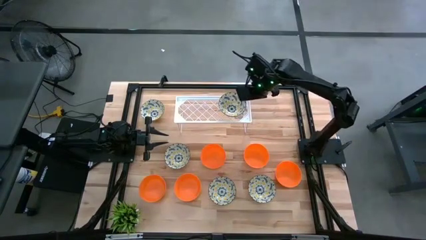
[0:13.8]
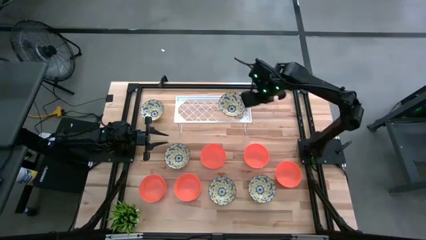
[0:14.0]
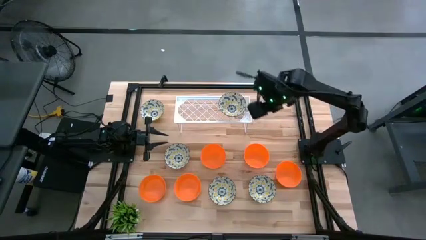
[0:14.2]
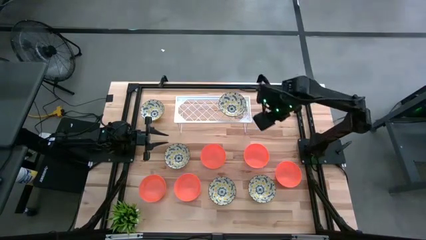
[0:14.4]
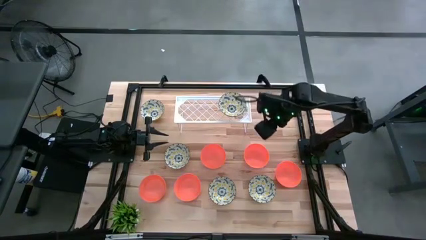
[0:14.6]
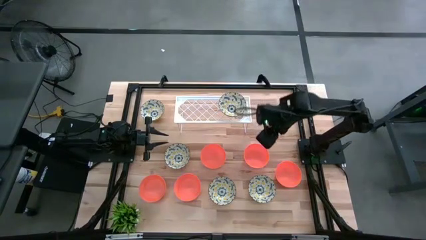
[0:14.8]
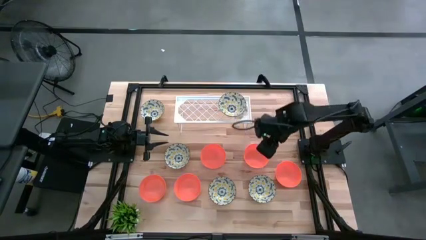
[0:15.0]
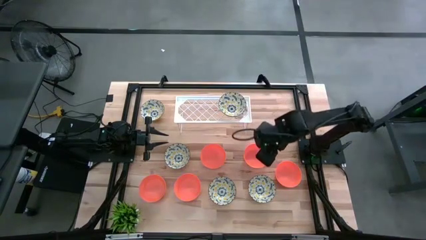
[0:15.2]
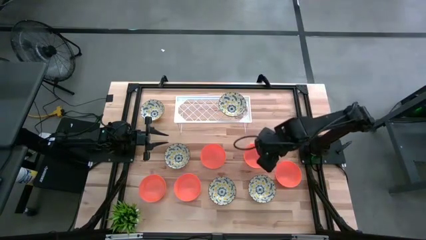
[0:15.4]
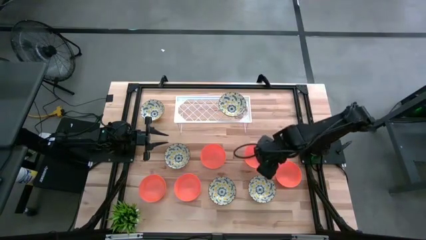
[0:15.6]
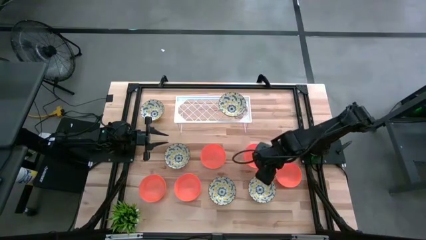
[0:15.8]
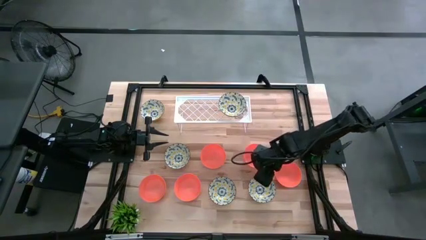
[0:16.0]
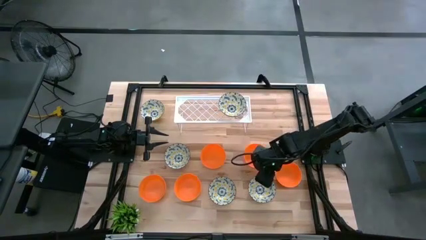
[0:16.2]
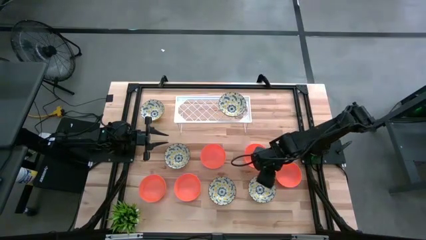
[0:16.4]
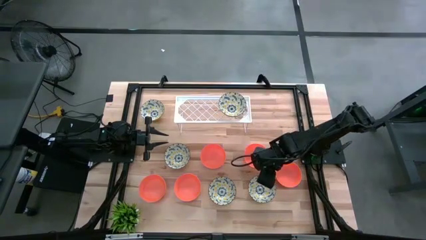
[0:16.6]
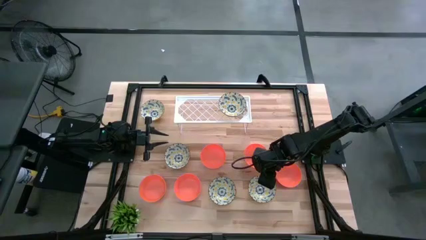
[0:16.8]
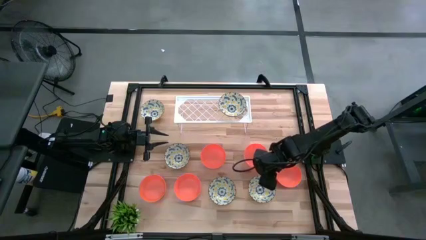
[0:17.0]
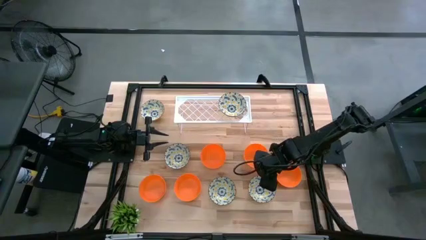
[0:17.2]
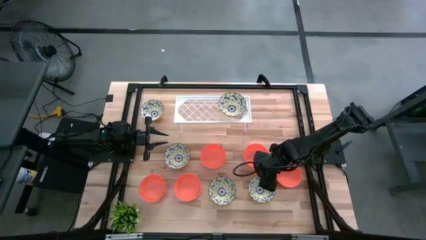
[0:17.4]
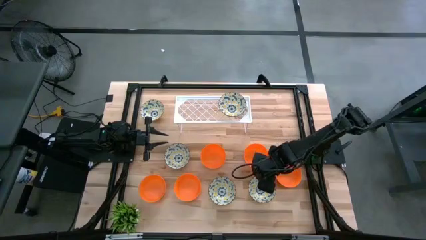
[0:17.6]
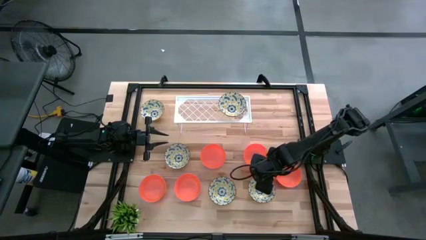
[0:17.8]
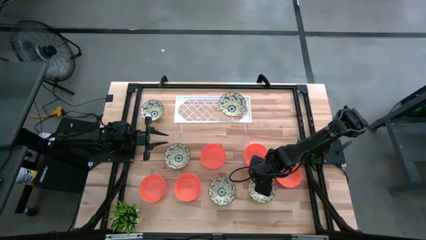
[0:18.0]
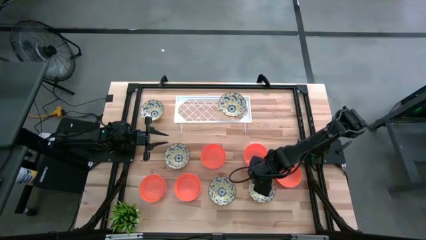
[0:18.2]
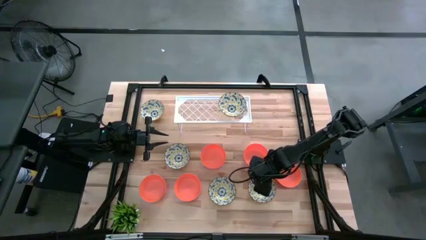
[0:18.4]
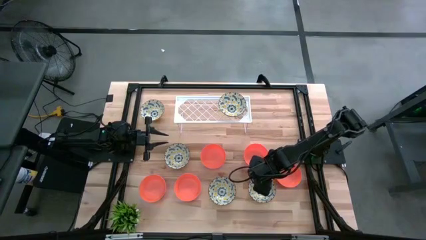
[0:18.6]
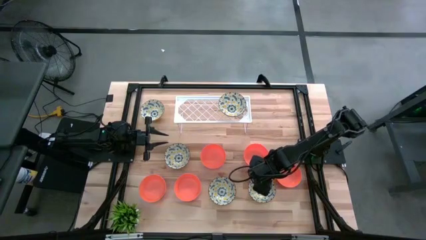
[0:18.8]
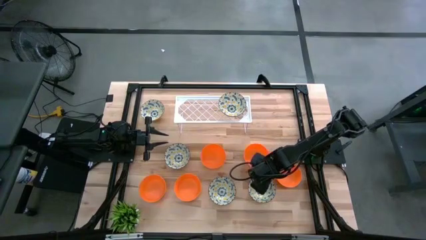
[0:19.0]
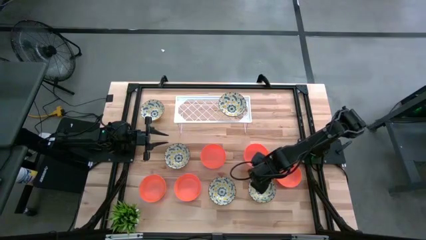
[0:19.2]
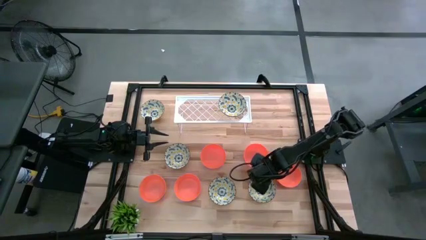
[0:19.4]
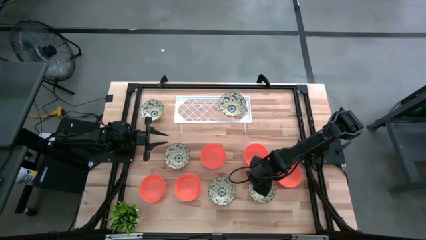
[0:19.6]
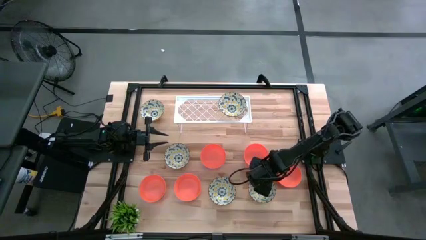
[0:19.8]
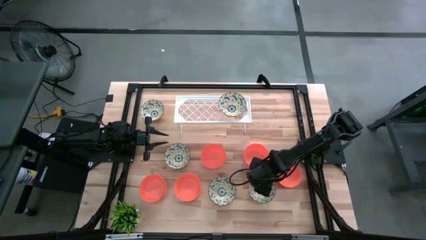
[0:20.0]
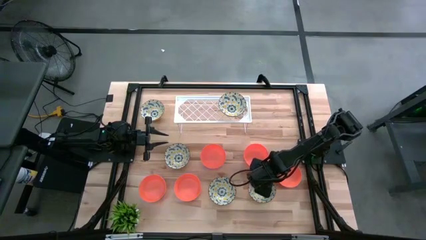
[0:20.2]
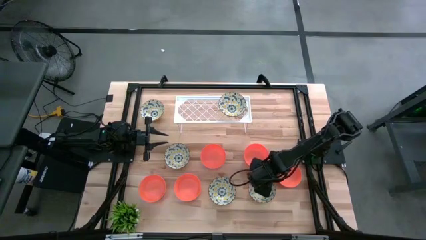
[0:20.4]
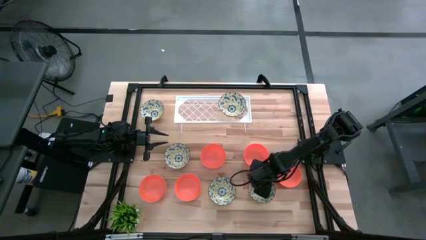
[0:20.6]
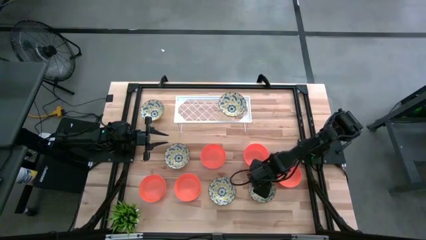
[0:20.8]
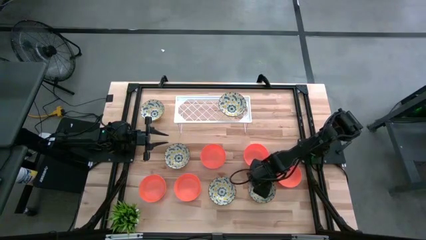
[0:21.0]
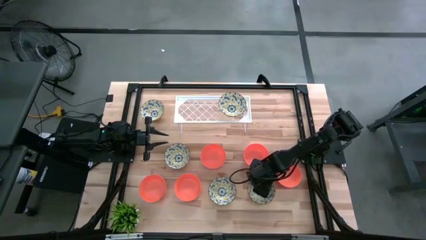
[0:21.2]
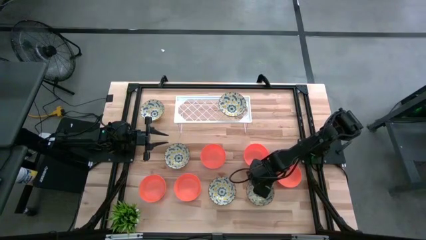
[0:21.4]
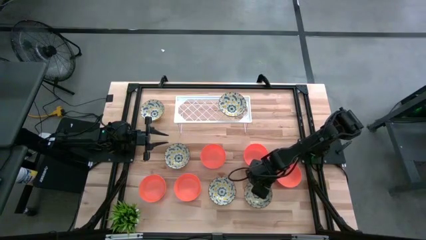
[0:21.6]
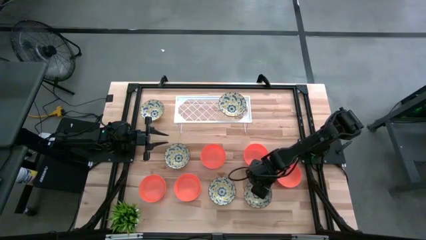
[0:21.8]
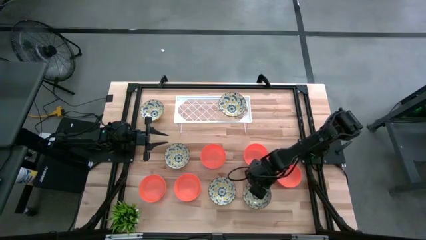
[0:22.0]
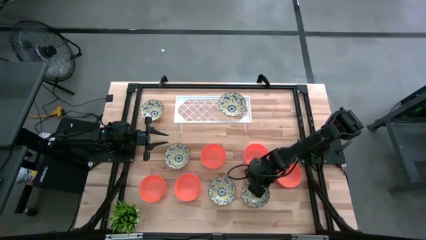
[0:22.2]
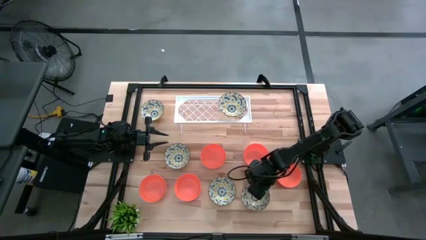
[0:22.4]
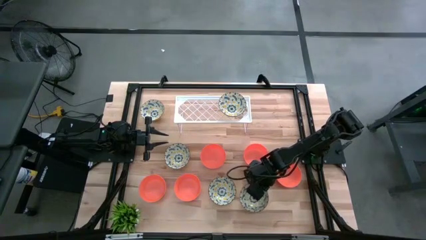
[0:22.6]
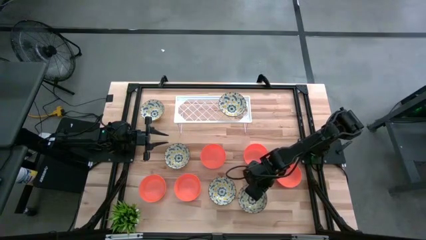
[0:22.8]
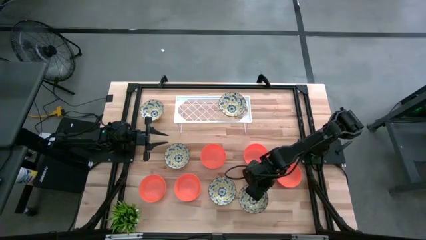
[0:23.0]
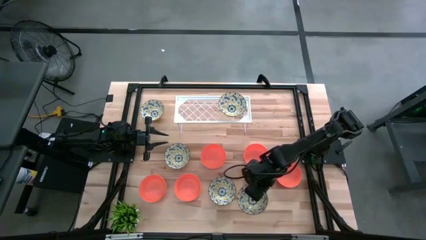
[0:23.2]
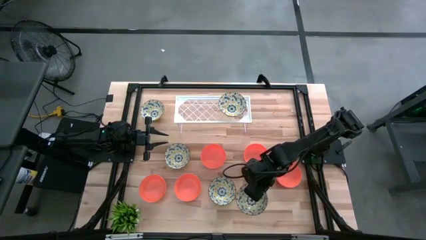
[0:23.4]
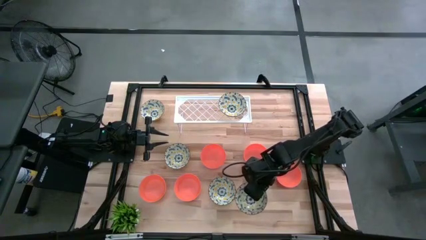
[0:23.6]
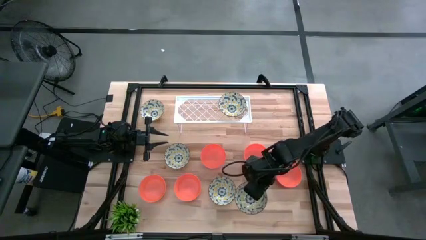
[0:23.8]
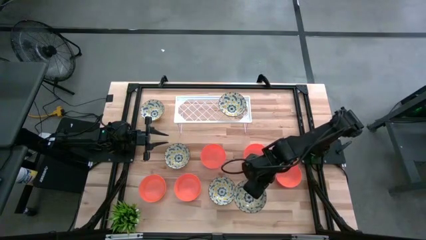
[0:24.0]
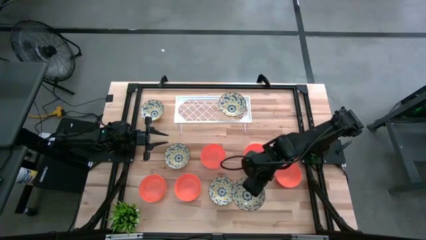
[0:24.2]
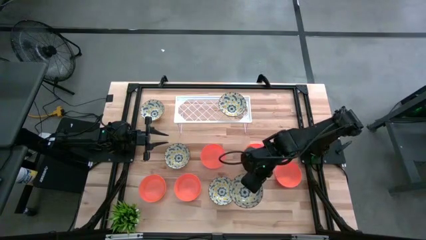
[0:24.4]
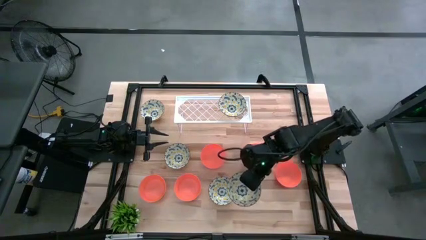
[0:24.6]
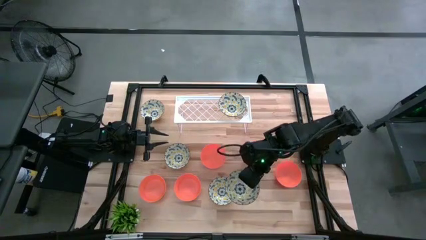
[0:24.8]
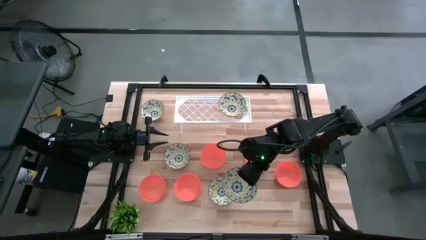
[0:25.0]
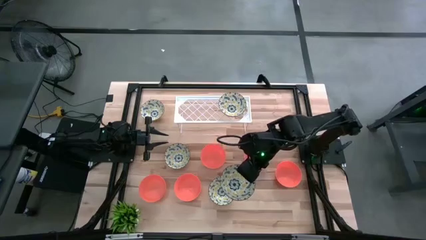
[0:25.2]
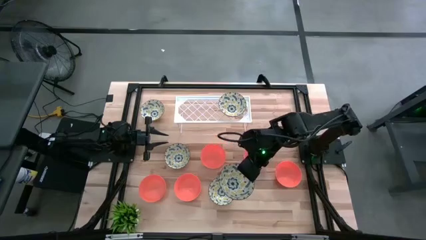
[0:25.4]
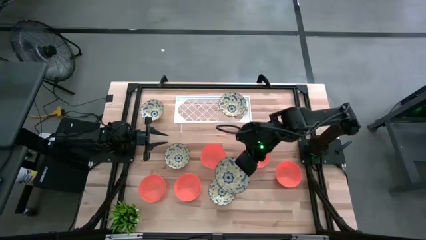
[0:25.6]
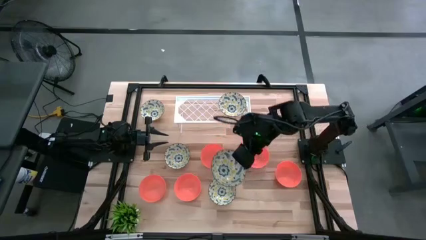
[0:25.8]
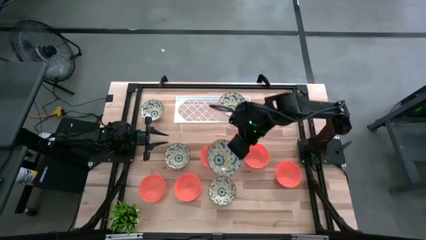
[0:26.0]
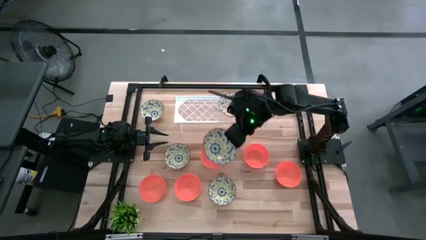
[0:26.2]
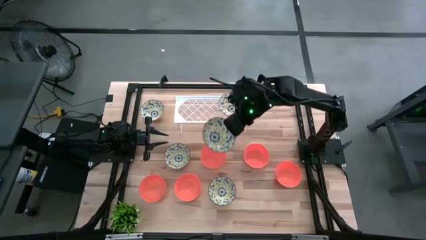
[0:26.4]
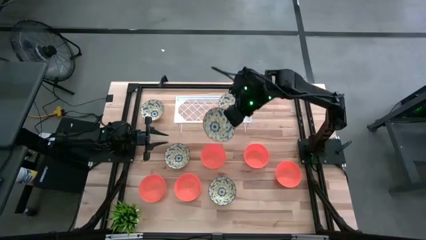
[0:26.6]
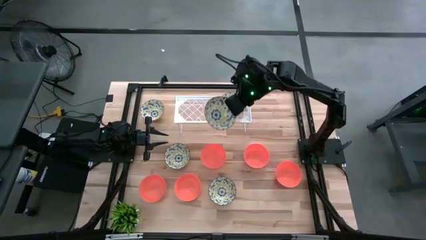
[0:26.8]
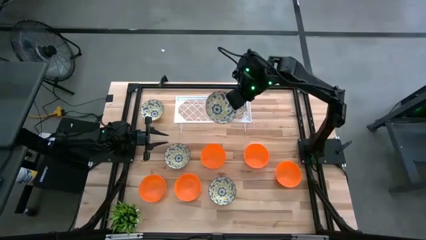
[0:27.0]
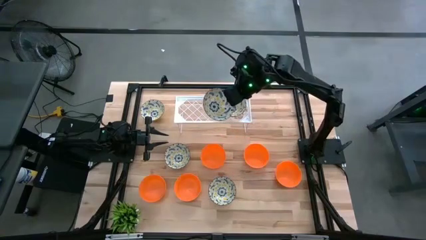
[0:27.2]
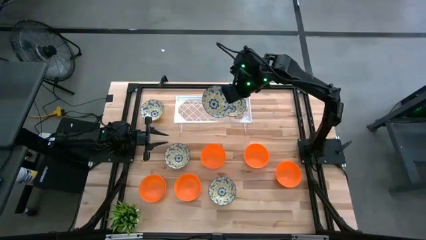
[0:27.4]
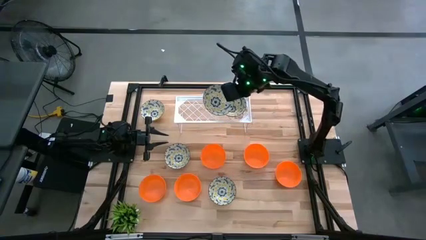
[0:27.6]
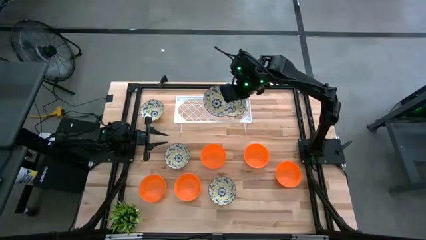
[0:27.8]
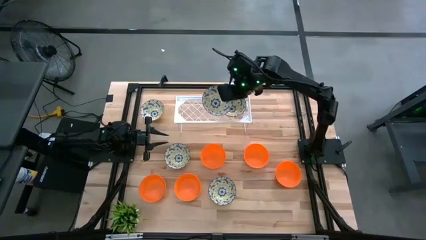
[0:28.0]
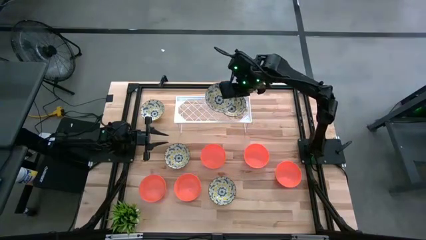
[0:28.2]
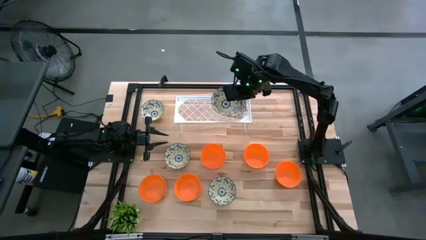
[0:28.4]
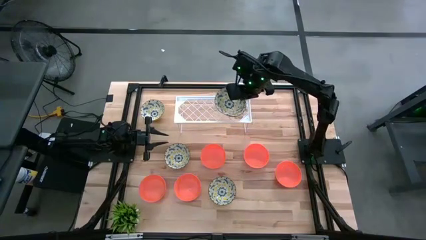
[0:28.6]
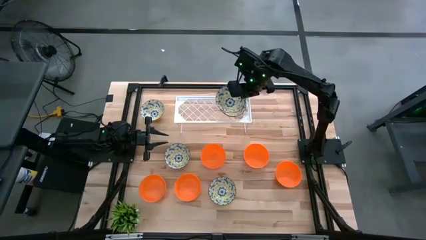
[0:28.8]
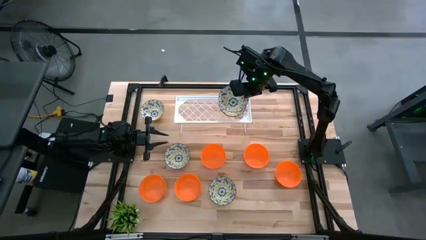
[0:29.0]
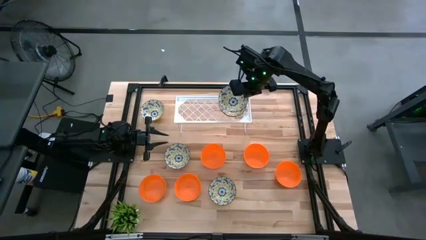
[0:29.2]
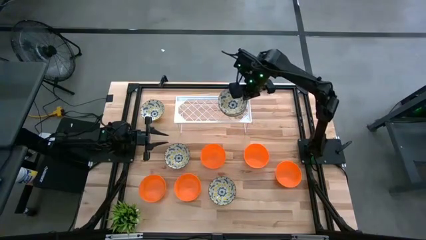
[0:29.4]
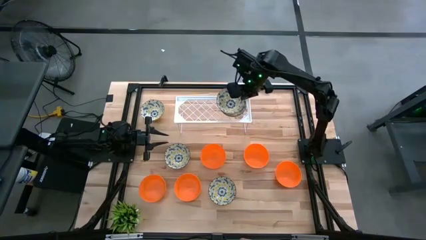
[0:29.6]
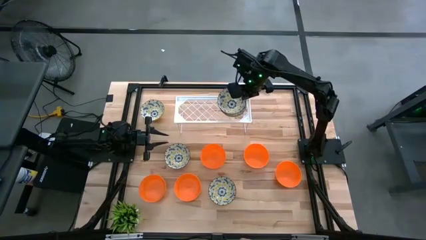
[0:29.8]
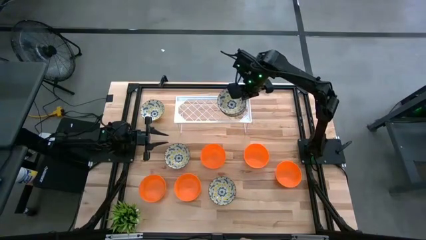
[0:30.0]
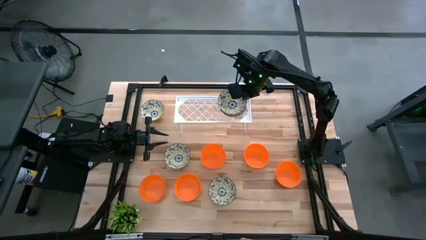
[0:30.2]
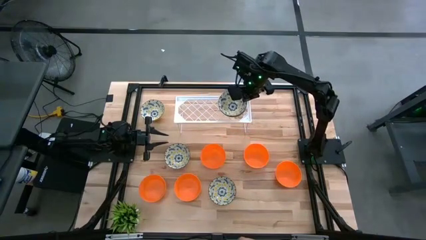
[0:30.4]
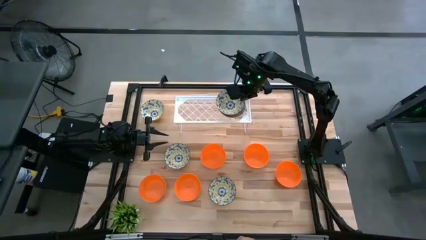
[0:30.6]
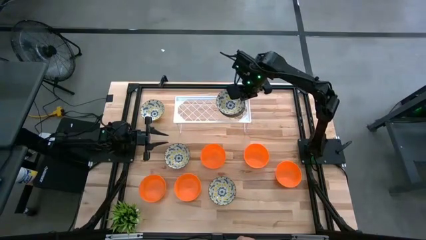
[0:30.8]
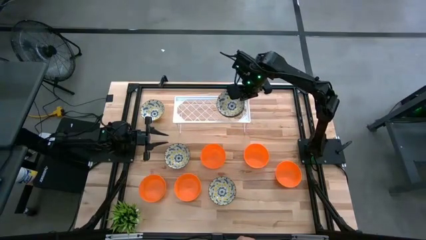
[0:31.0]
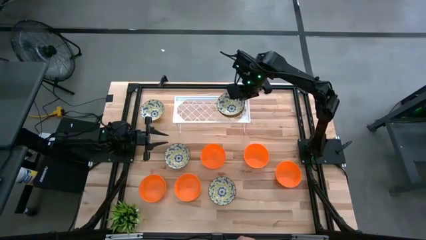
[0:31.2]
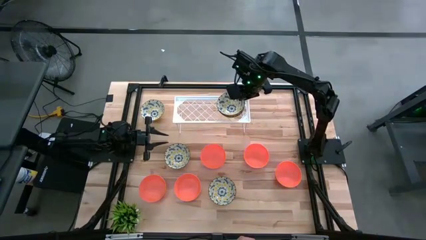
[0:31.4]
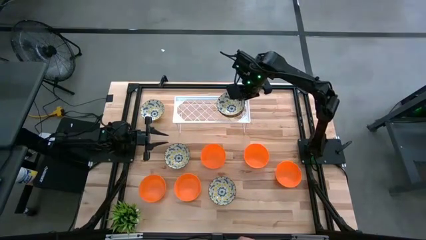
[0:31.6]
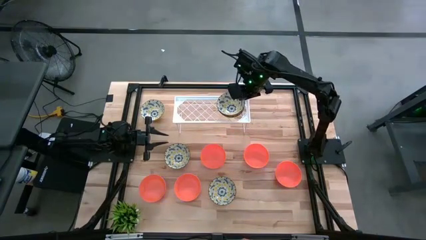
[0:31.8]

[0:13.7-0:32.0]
Task: Pick & Place Mini bowls
Stack the white patterned bowl on the other white patterned bowl on the shelf
